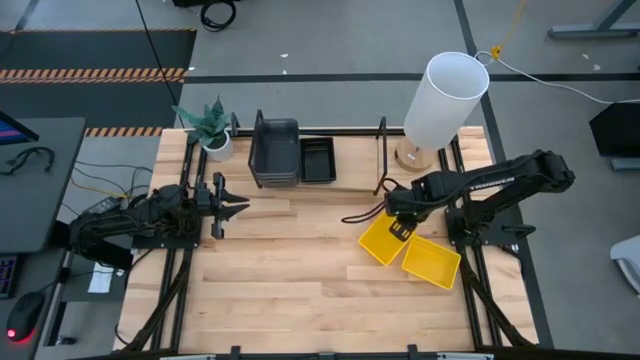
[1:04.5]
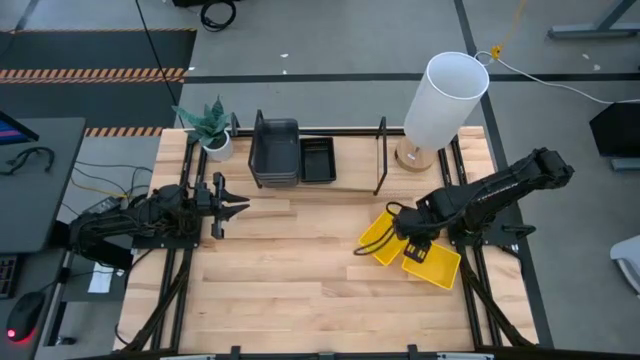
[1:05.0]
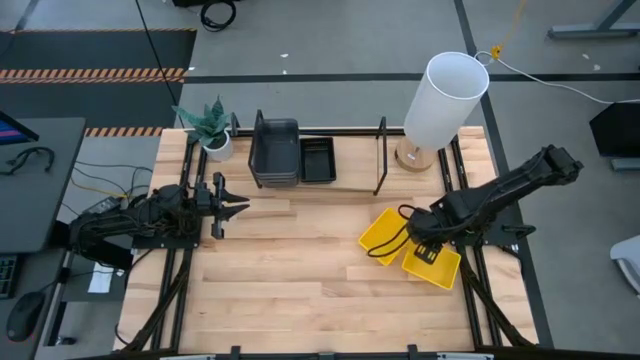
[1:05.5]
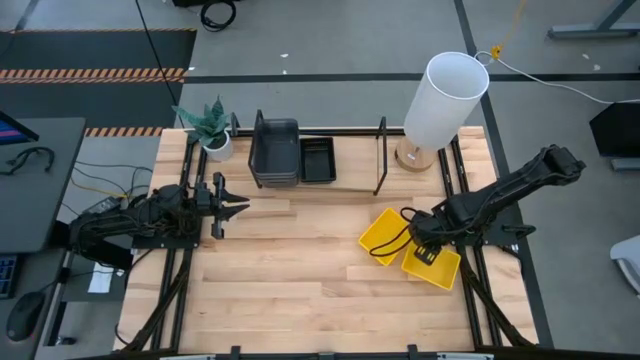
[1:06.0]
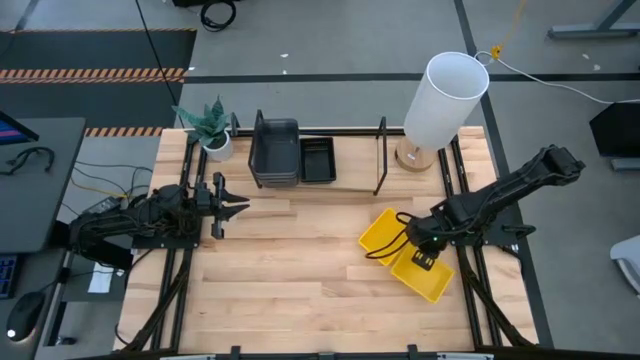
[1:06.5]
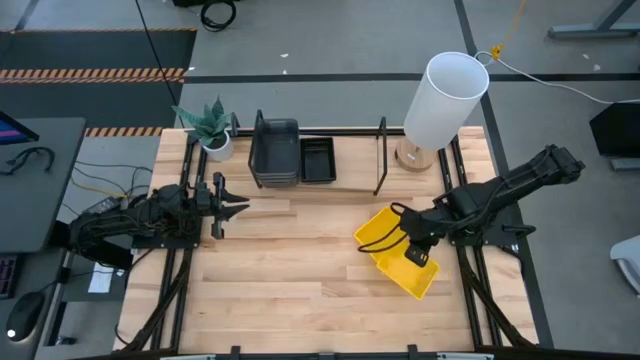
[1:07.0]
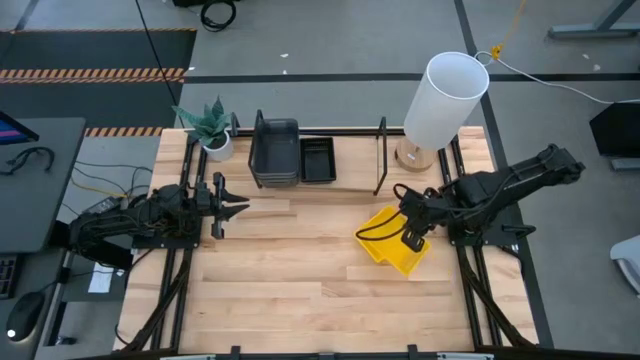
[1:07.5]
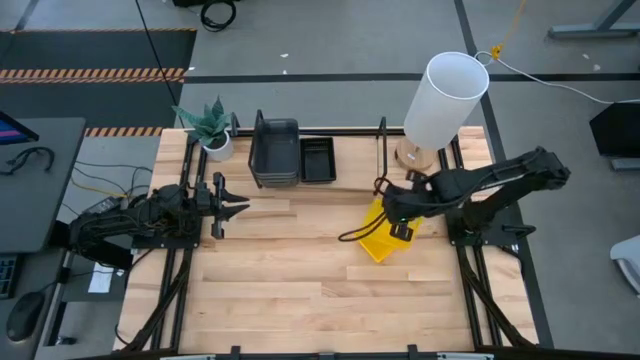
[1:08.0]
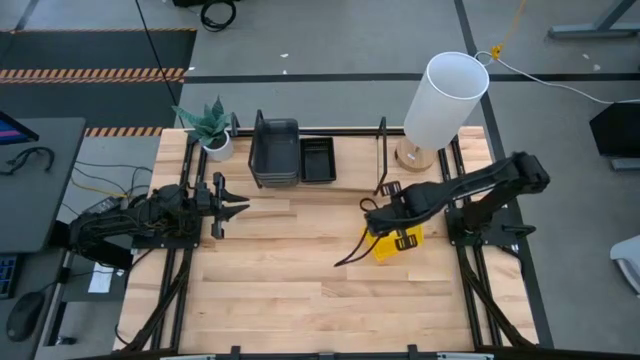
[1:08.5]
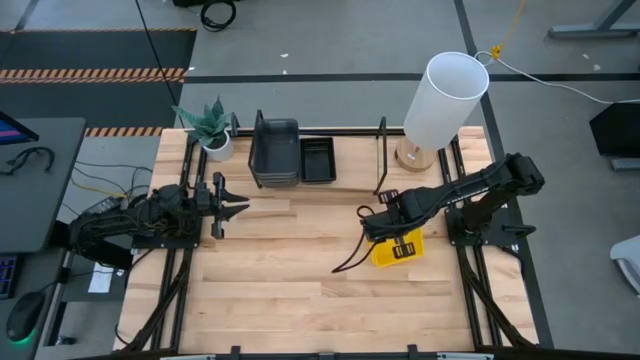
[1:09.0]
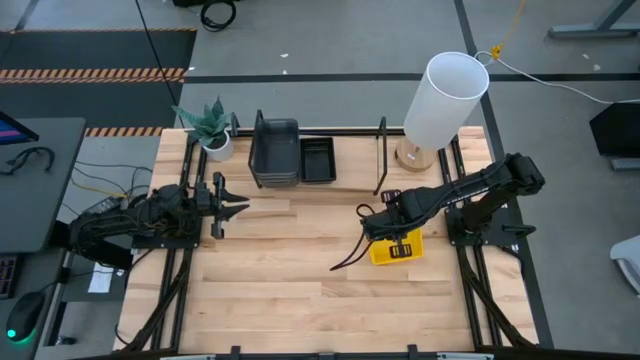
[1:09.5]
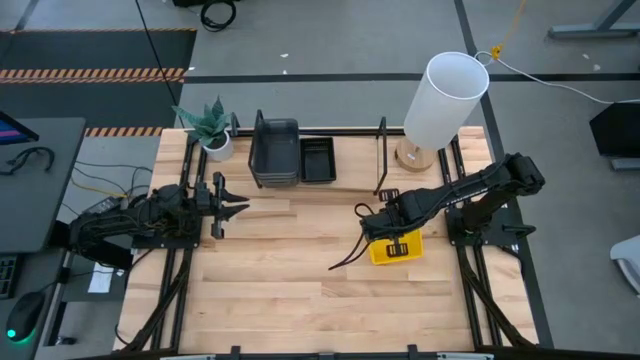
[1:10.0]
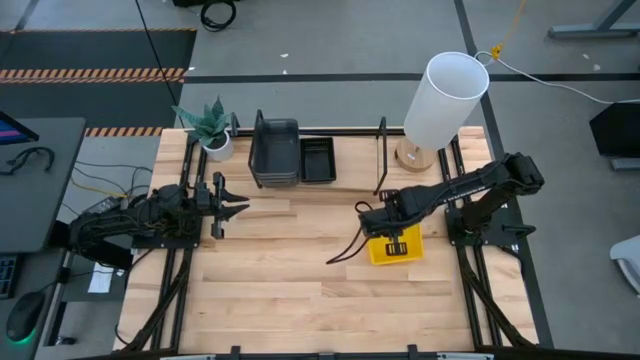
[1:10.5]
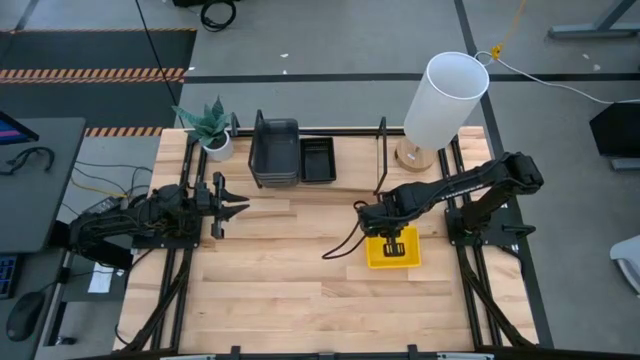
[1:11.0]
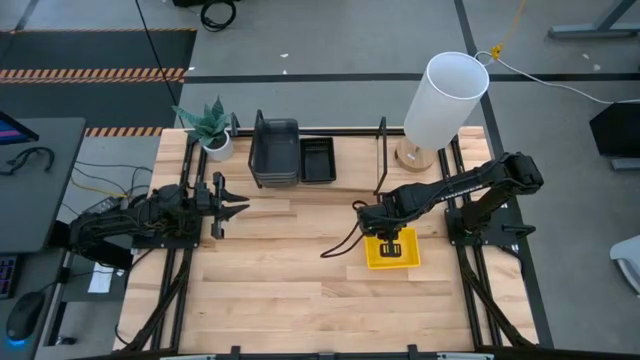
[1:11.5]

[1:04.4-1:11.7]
Task: Stack baskets on shelf by color
Stack the right yellow basket on the left yellow baskets

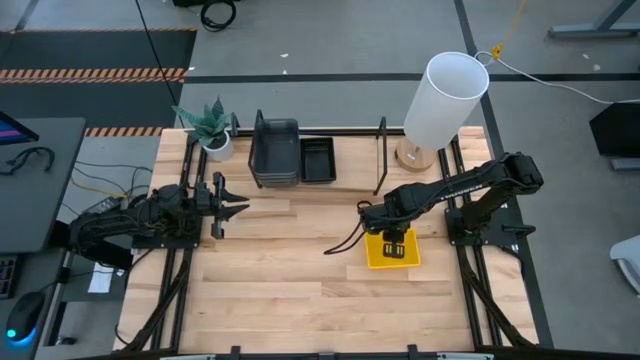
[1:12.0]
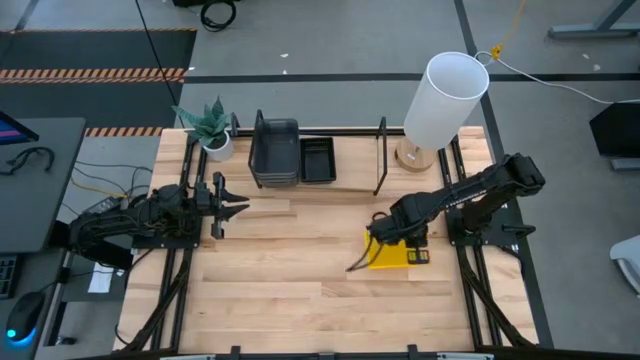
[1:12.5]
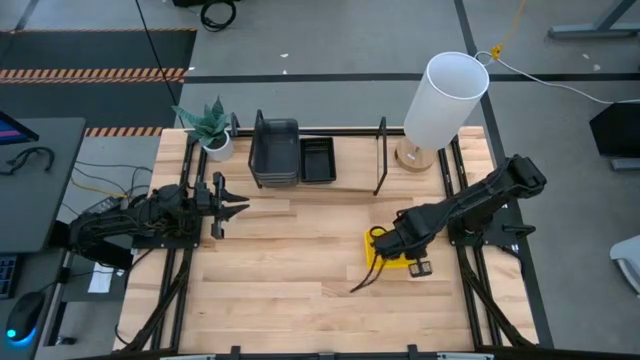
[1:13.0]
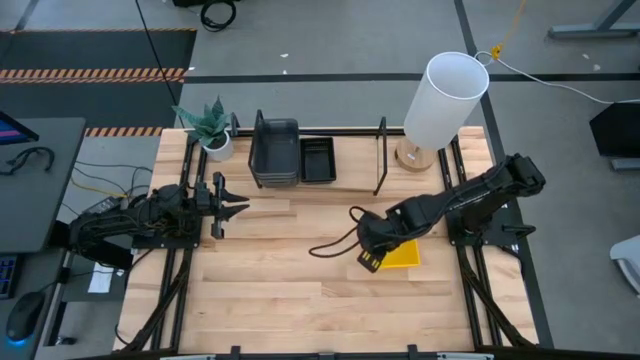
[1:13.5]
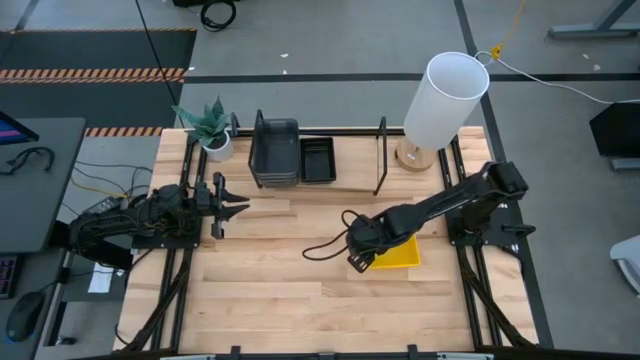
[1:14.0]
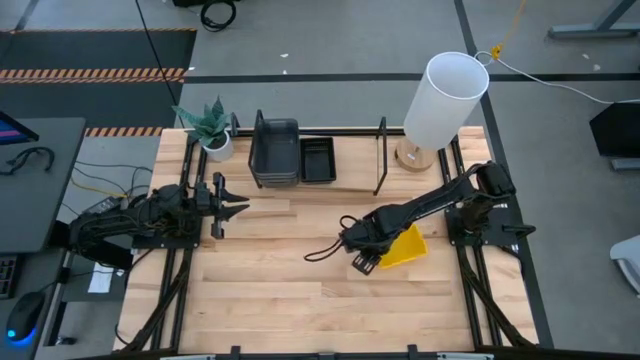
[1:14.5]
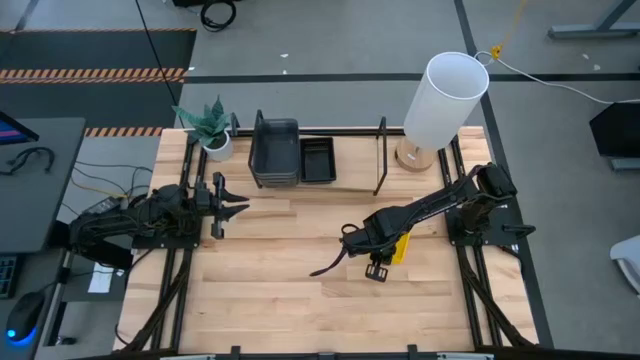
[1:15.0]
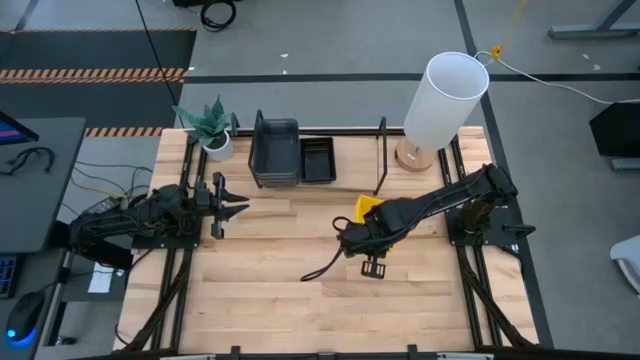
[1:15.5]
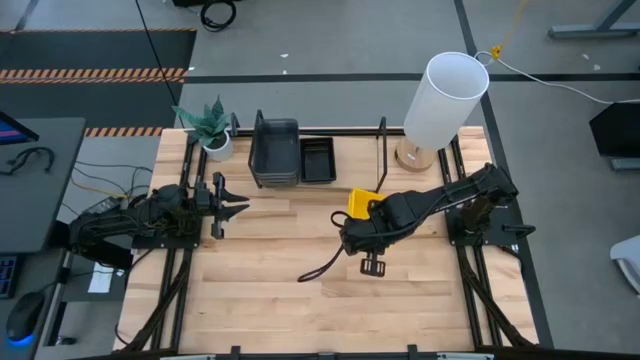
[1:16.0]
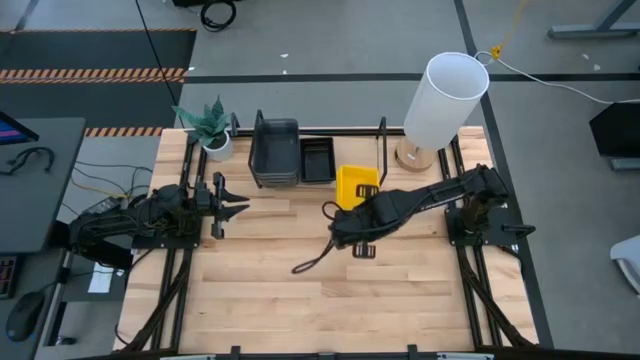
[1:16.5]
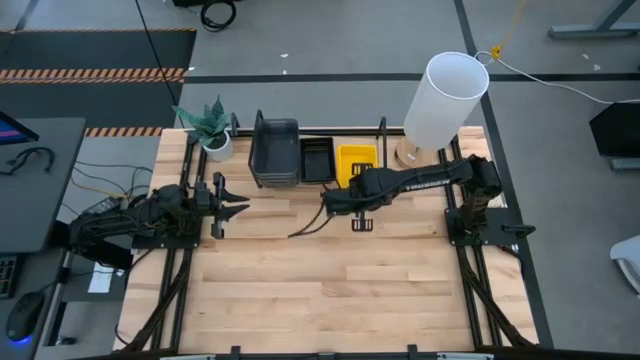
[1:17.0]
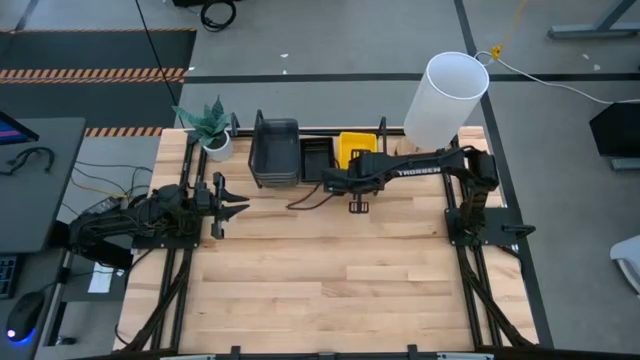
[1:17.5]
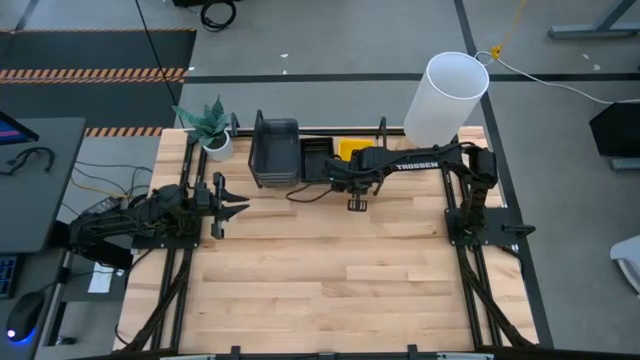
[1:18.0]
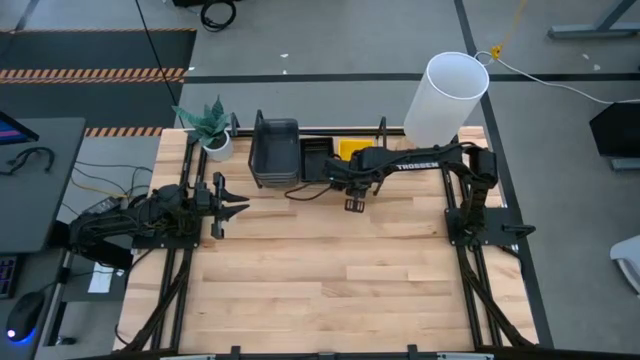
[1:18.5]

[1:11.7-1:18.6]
Put the stacked yellow baskets on the shelf

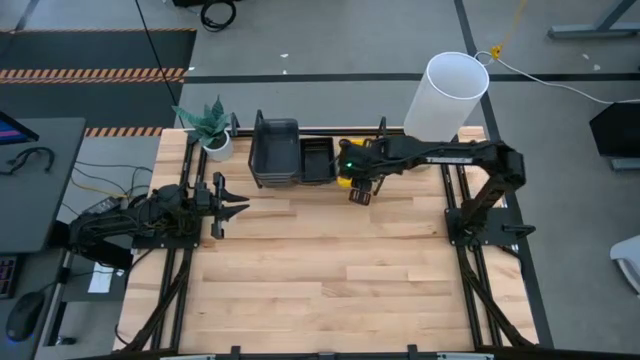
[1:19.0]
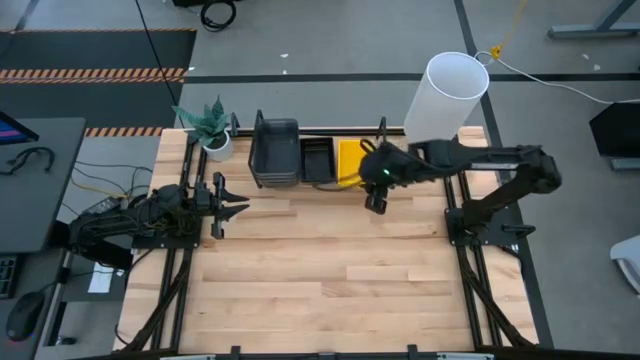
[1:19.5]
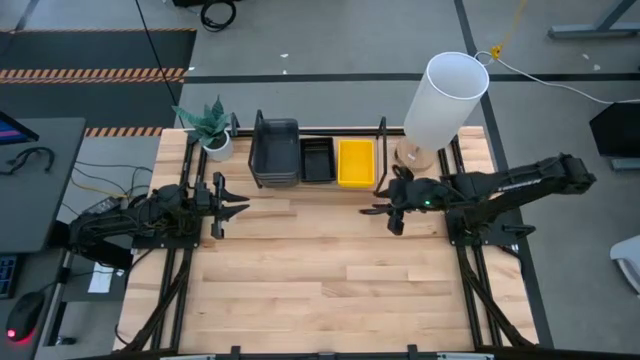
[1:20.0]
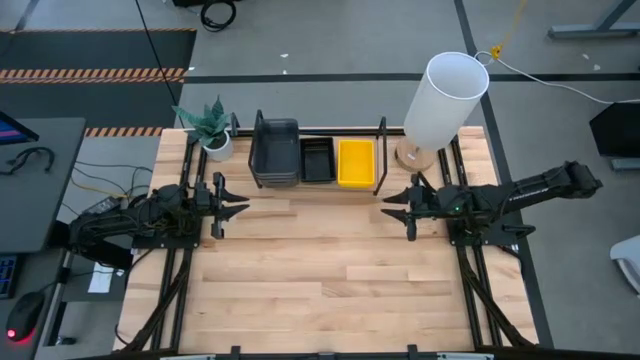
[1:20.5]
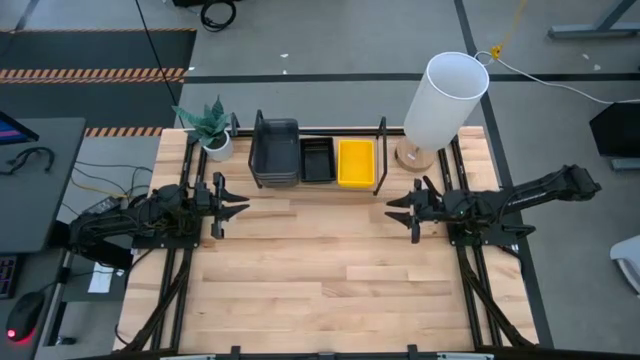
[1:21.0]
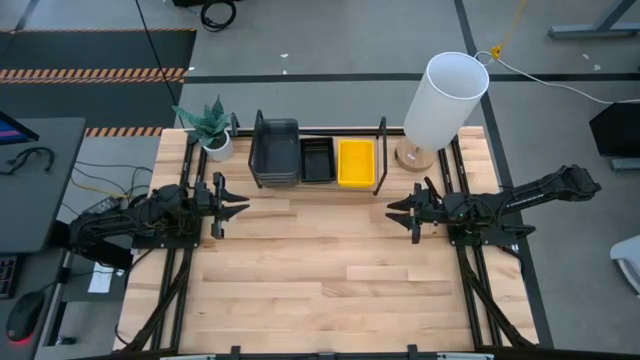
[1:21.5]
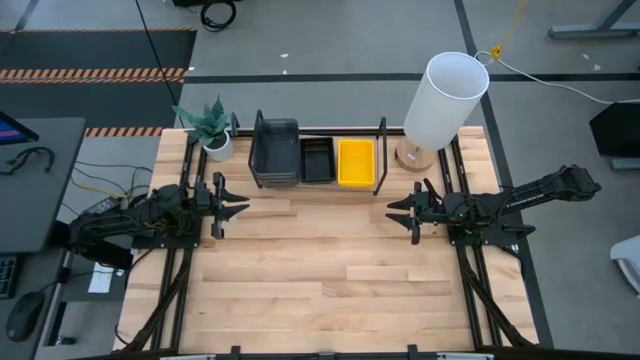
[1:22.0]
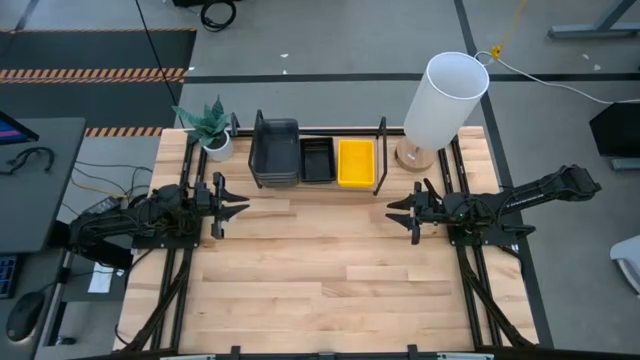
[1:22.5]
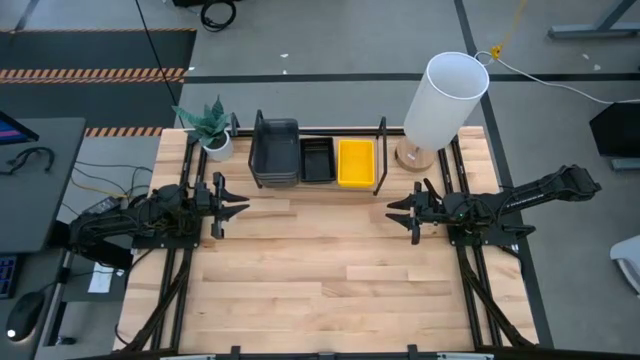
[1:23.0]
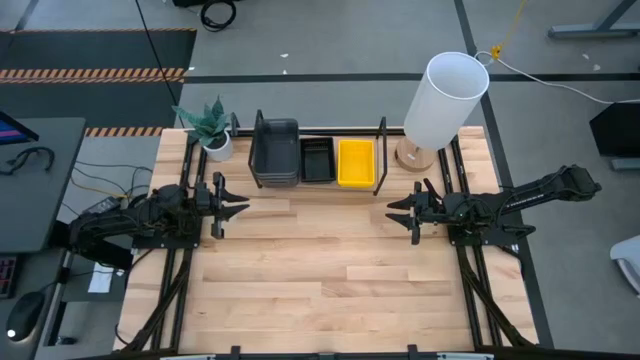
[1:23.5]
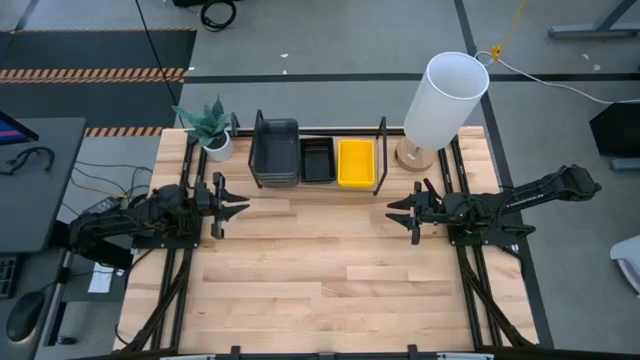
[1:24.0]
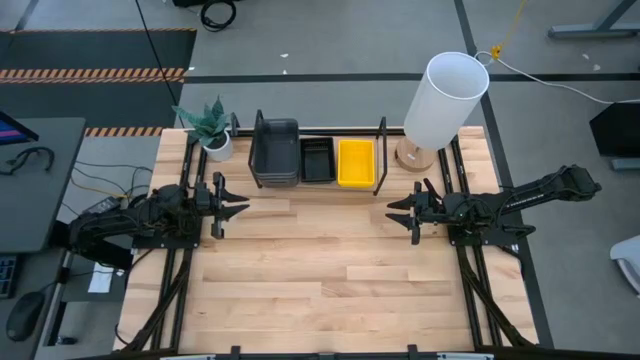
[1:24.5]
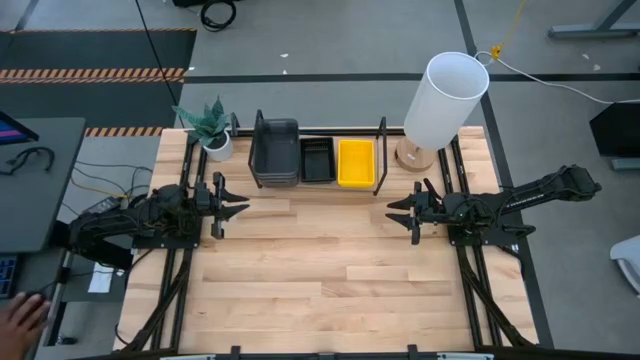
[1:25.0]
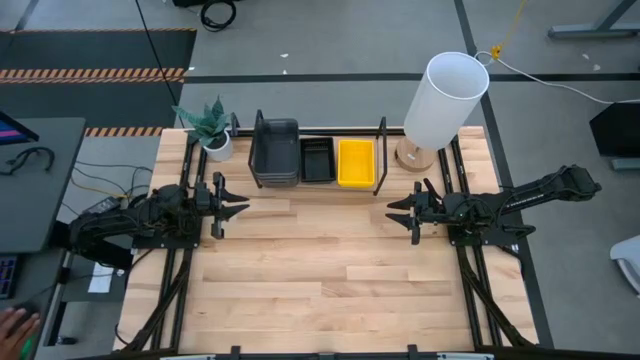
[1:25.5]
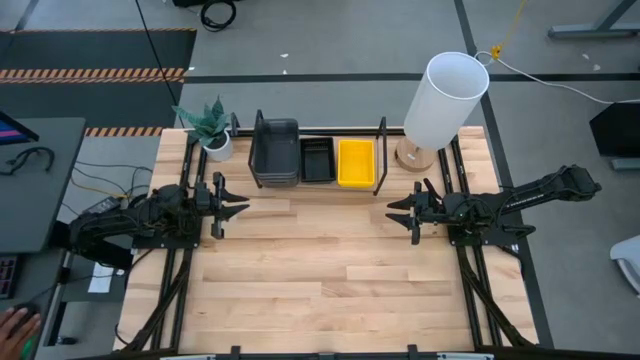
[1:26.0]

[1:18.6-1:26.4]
Return to Home Position
